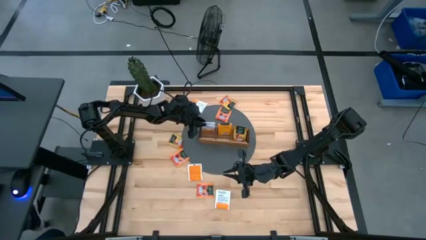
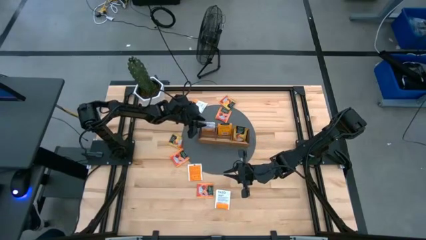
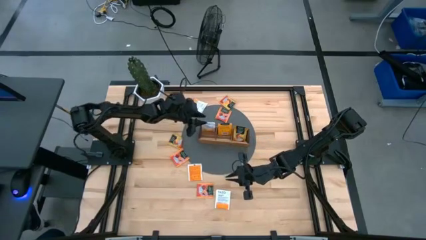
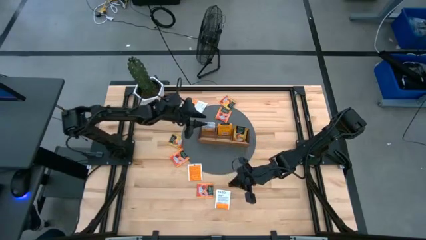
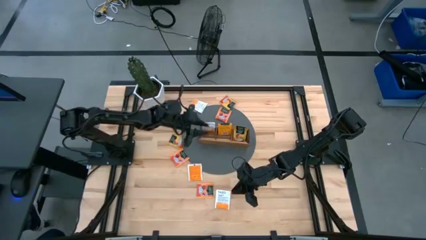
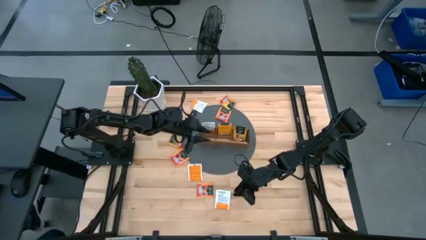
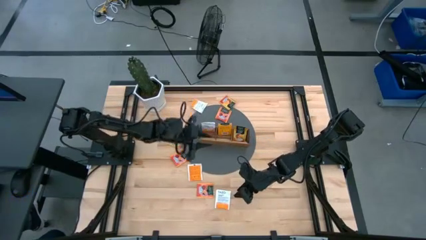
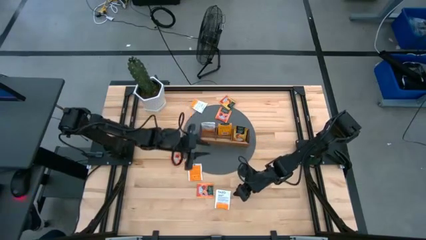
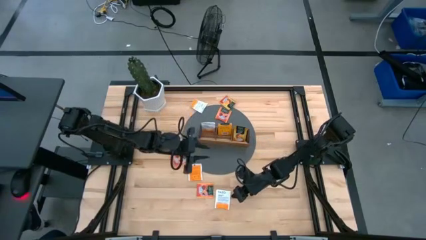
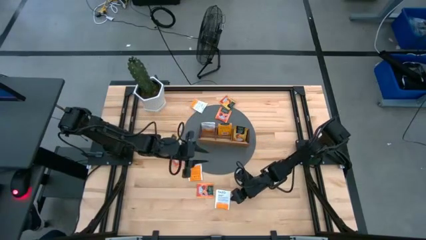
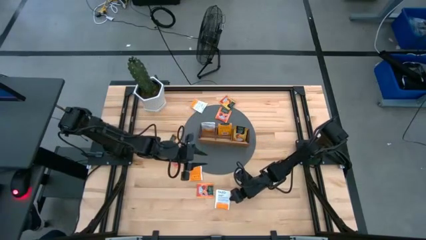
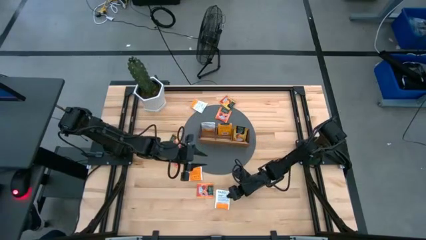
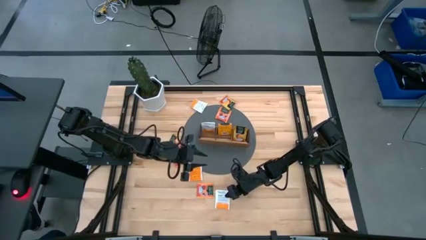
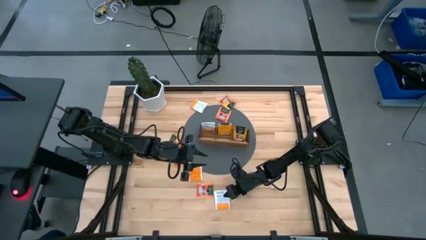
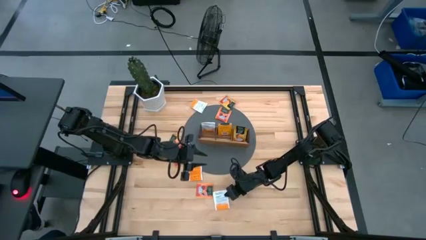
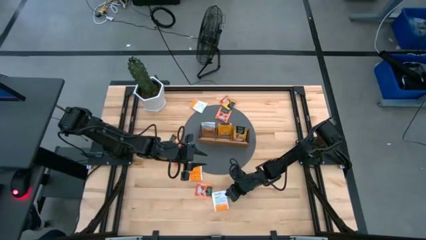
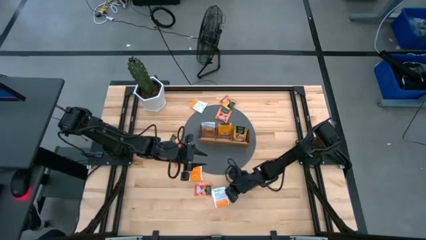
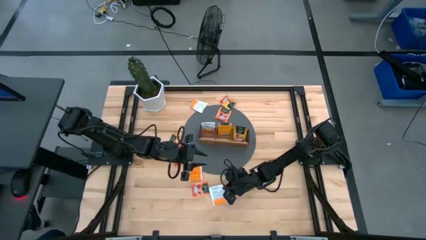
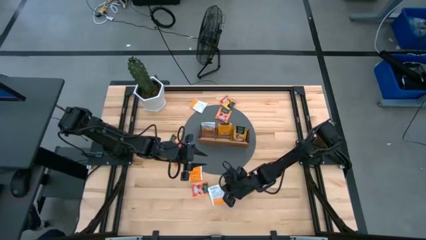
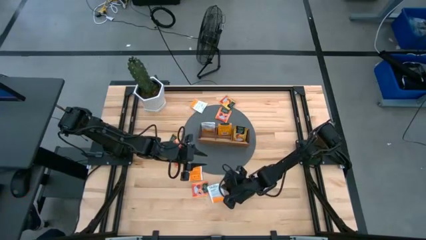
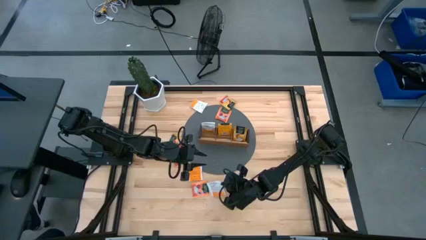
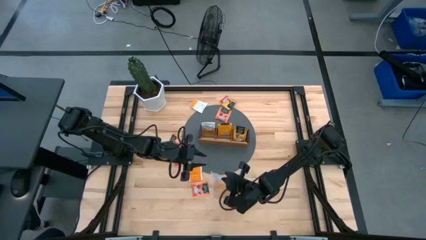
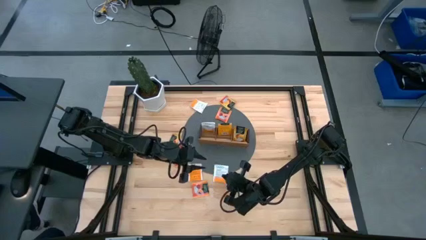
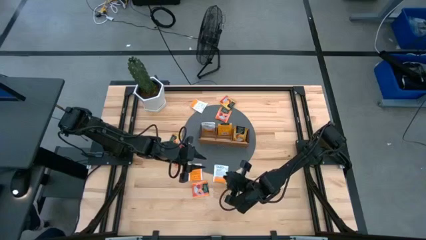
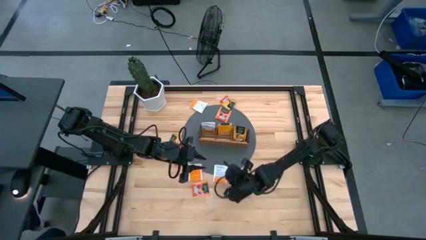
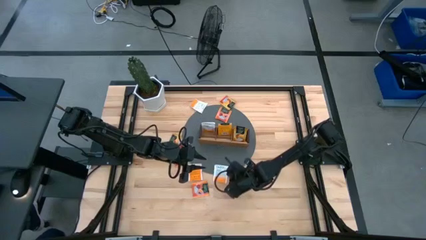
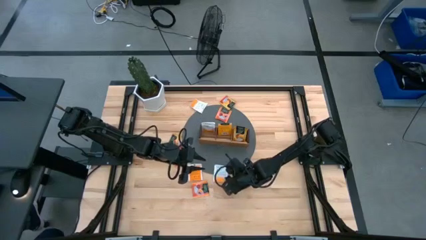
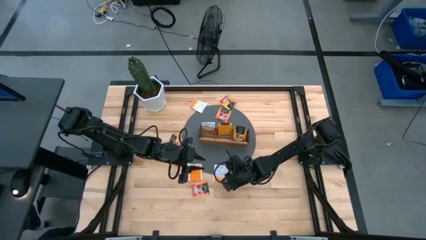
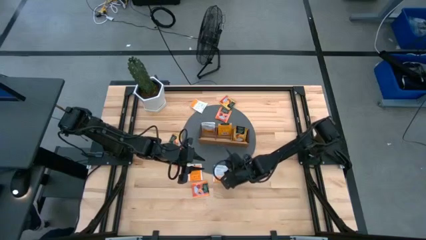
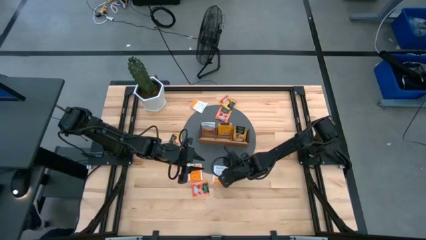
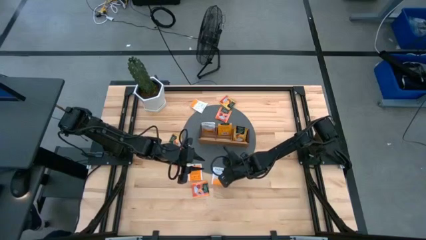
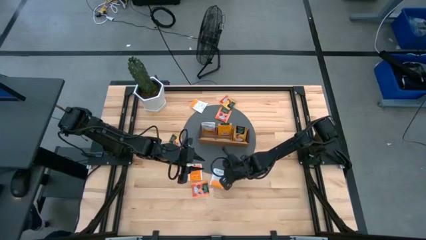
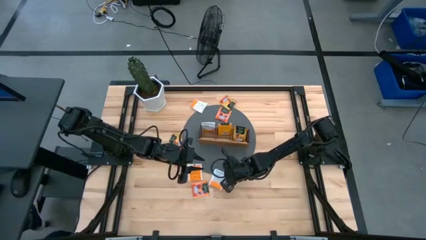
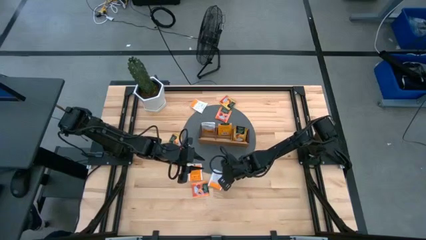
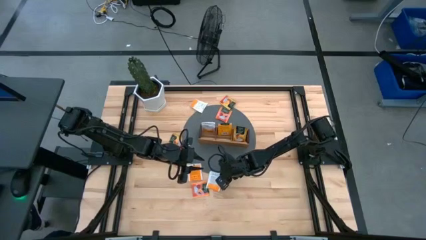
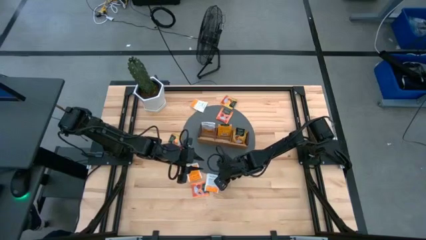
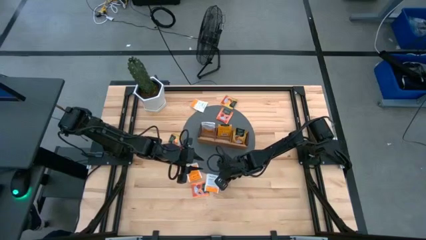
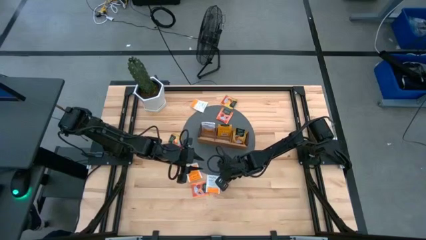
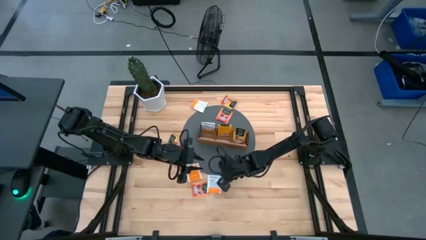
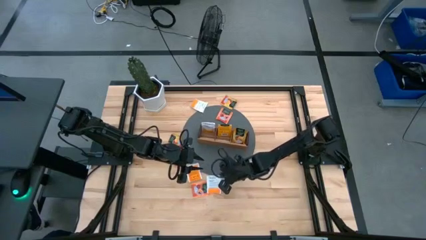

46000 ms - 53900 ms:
Task: Pick & Place Tea
Put the white tea bag into the left section of the wooden organizer

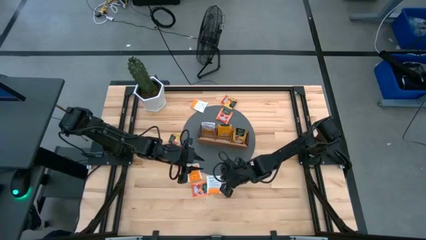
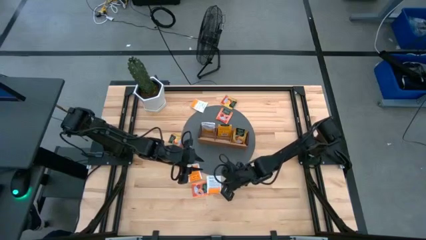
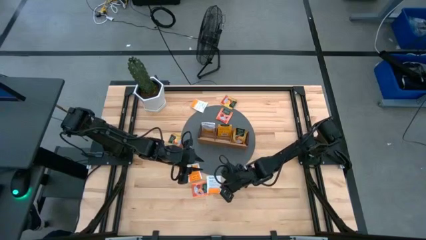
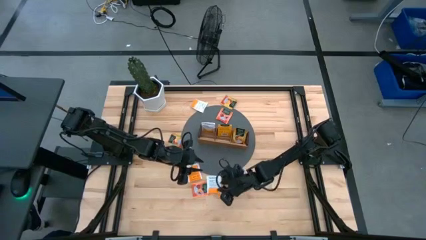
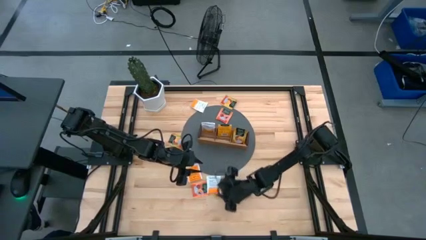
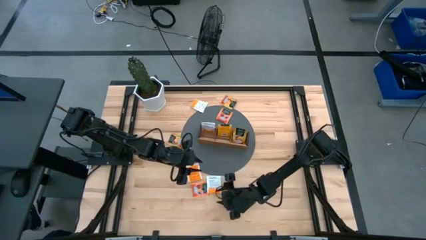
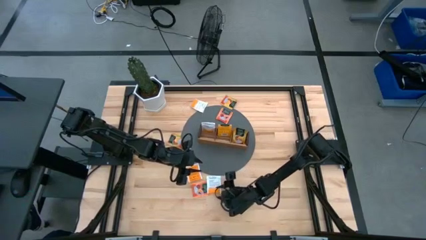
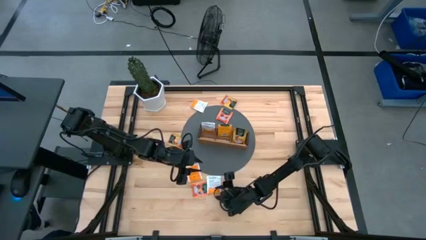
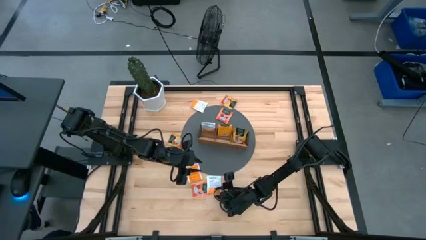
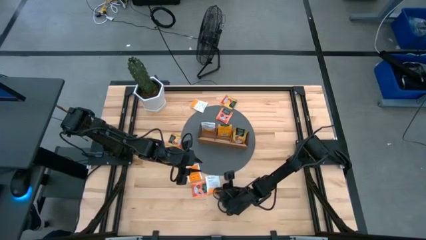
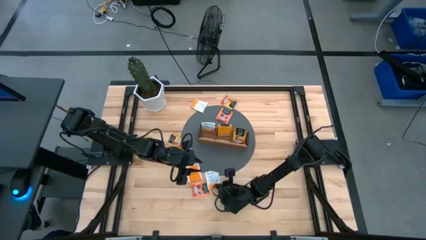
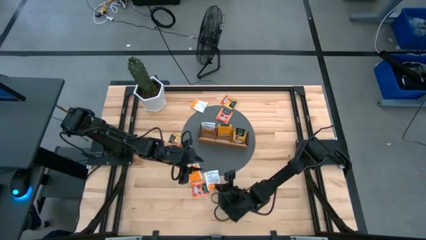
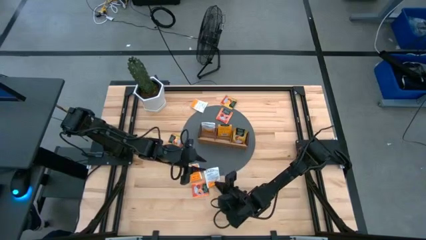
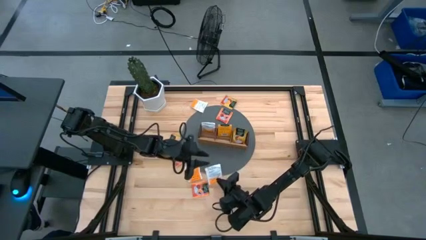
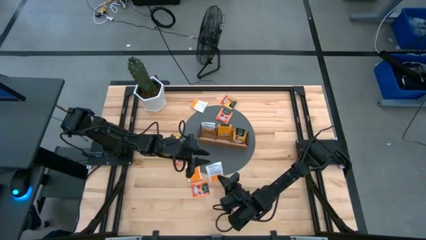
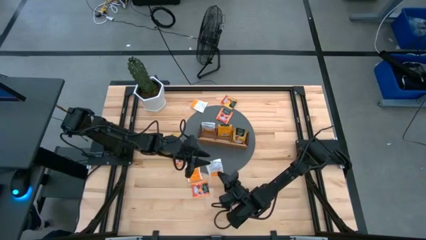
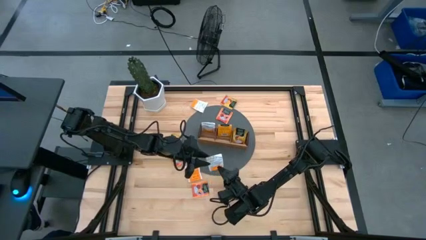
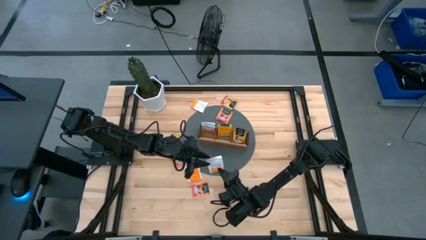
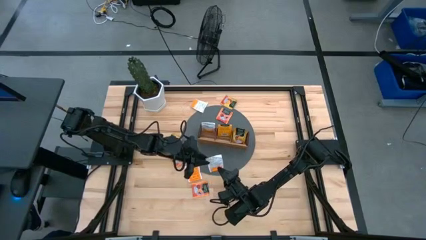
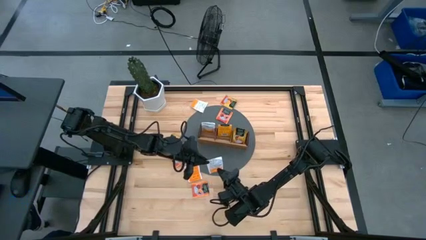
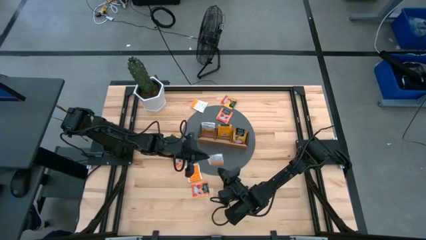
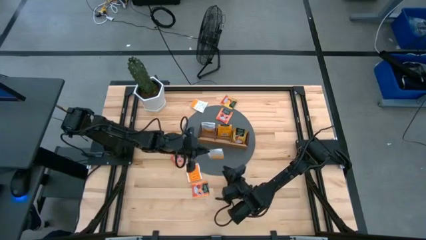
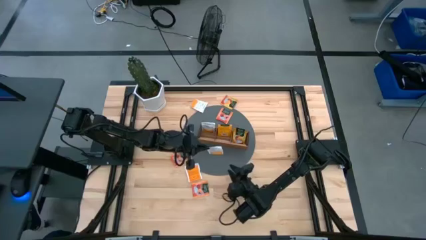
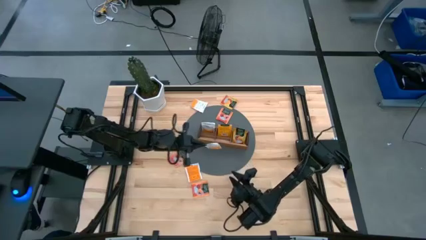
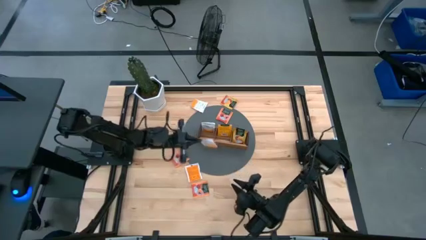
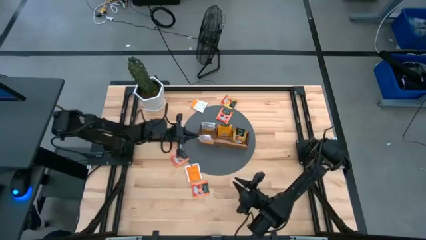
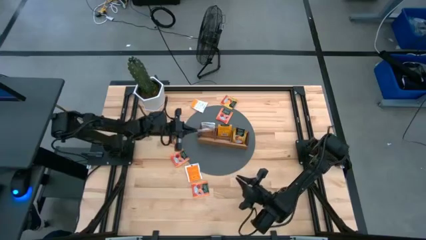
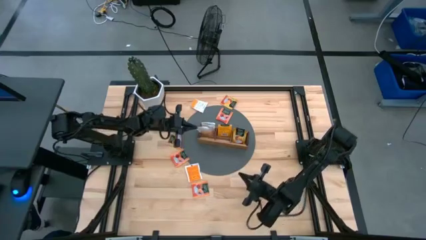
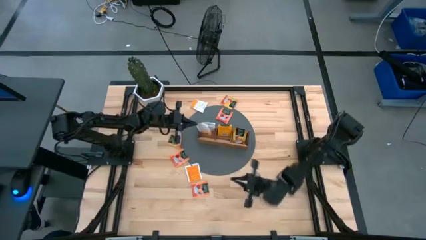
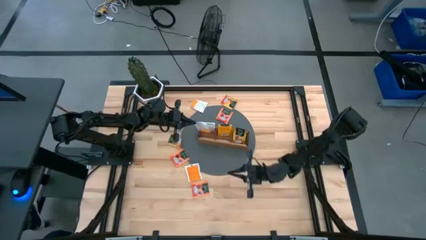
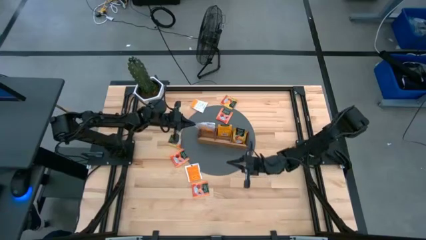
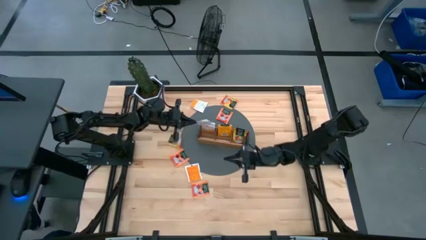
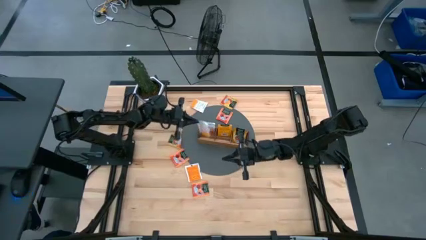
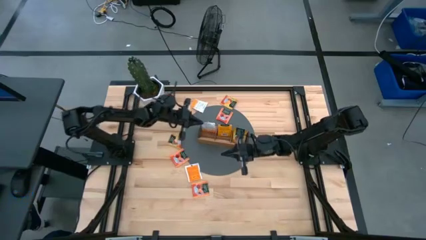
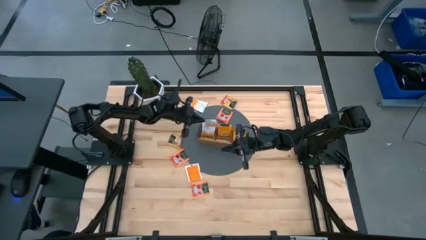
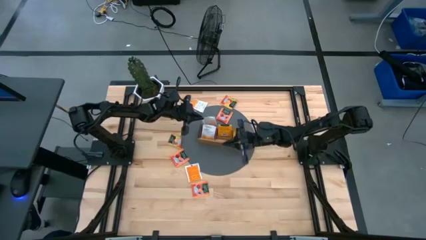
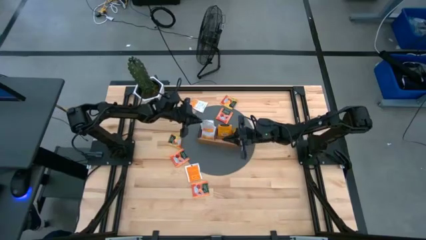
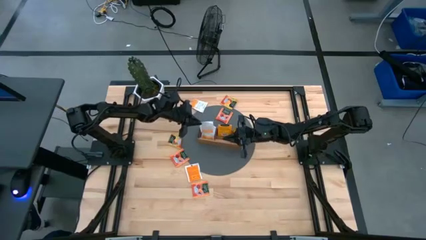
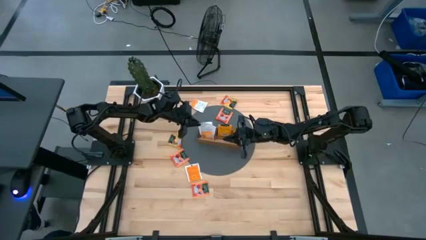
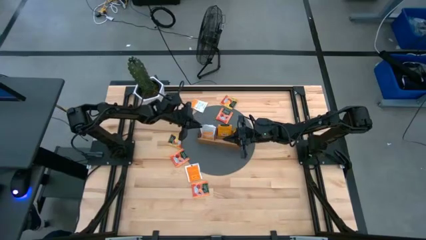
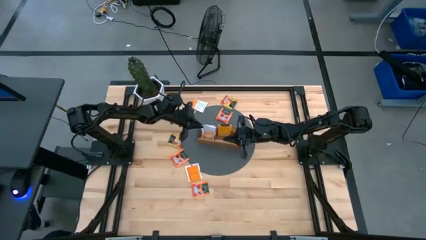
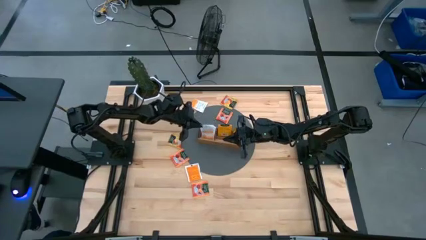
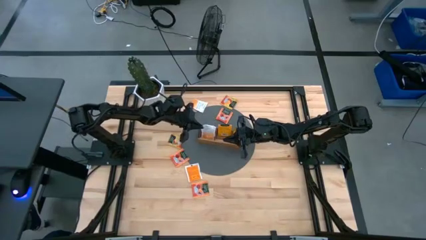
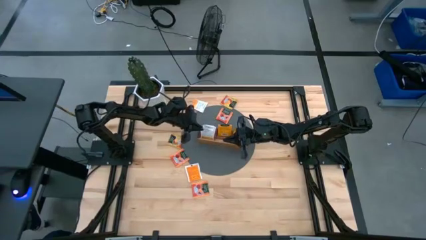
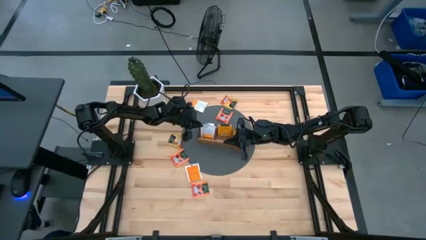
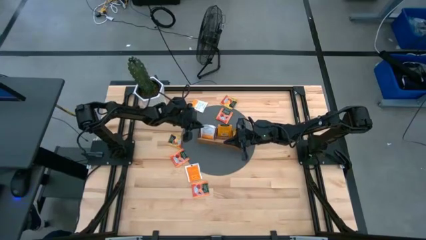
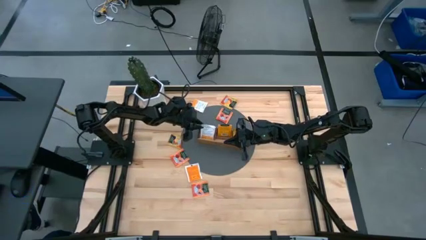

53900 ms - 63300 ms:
Put the white tea bag into the left section of the wooden organizer
